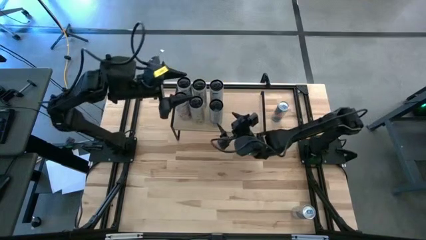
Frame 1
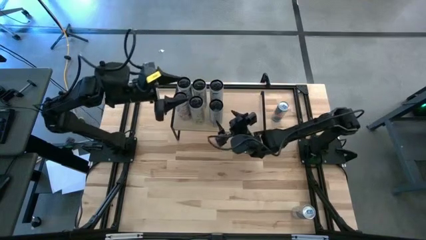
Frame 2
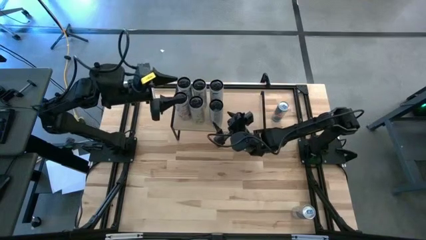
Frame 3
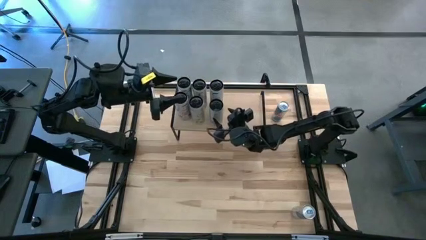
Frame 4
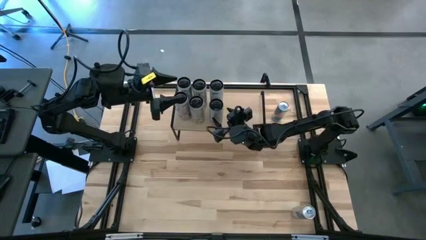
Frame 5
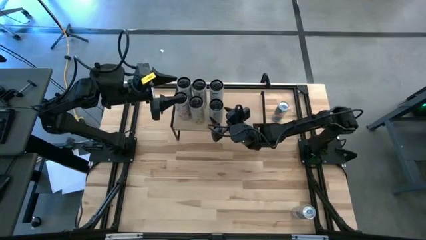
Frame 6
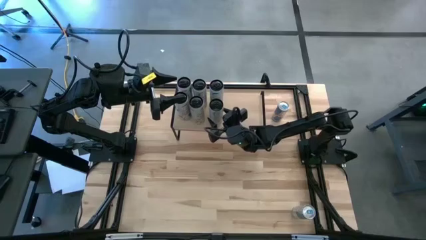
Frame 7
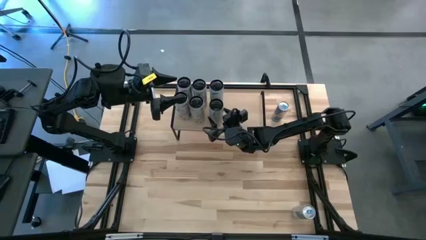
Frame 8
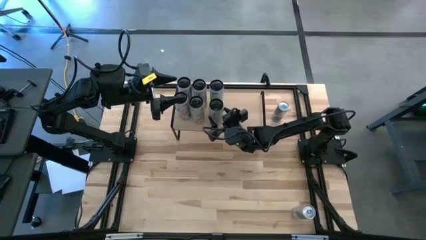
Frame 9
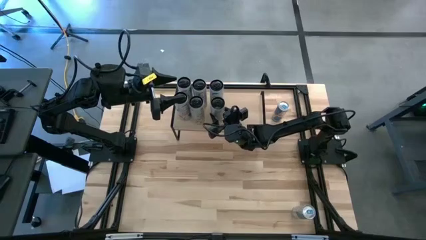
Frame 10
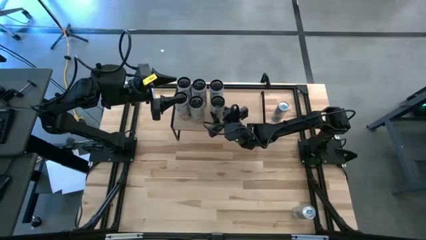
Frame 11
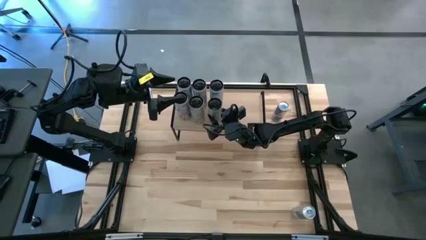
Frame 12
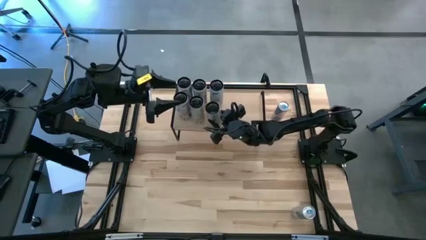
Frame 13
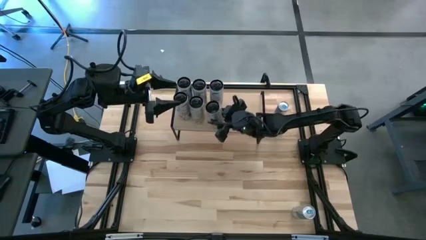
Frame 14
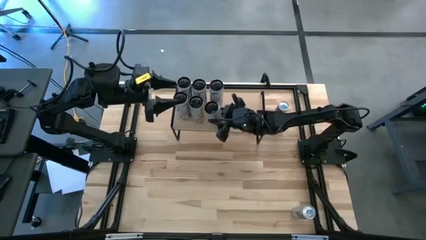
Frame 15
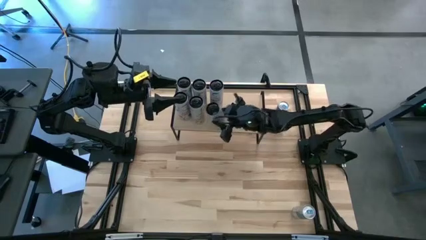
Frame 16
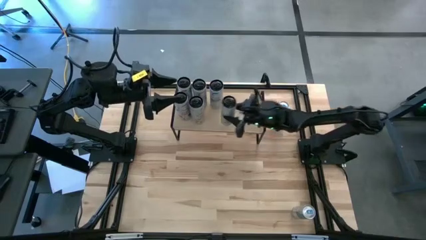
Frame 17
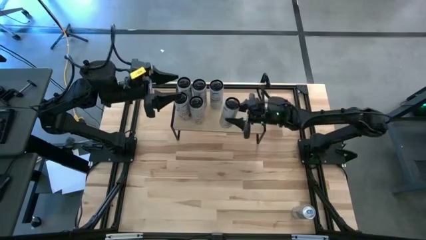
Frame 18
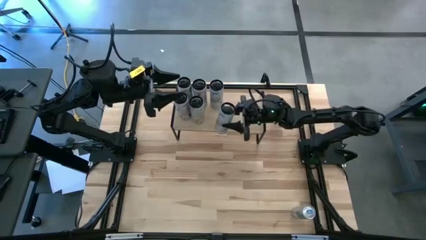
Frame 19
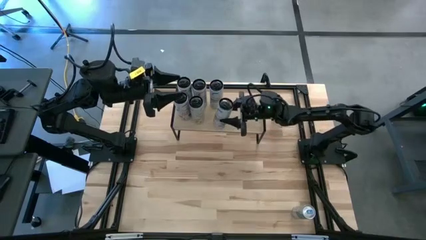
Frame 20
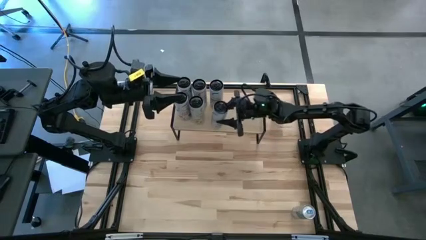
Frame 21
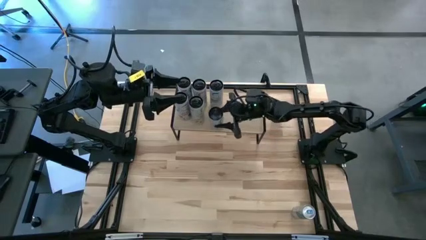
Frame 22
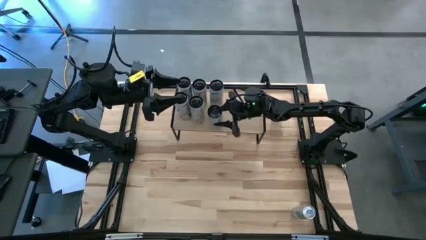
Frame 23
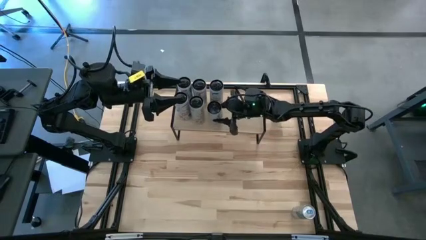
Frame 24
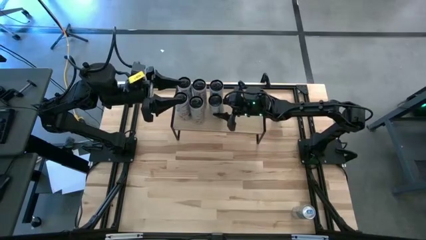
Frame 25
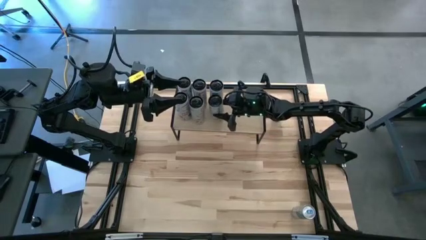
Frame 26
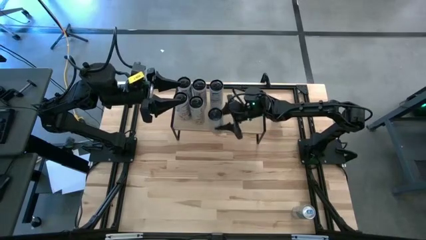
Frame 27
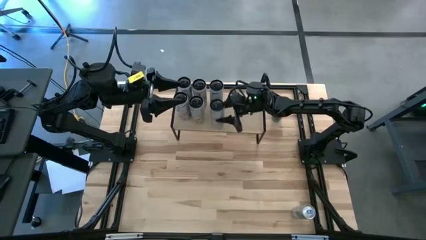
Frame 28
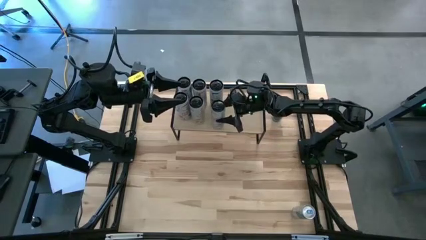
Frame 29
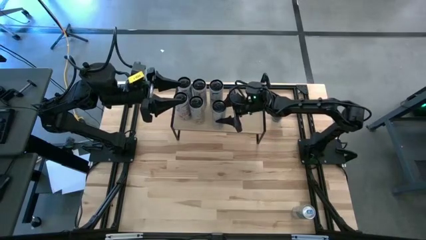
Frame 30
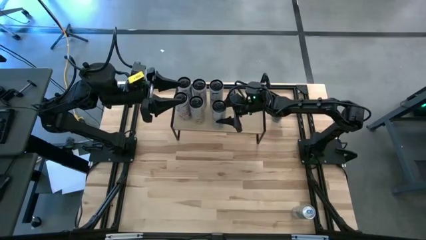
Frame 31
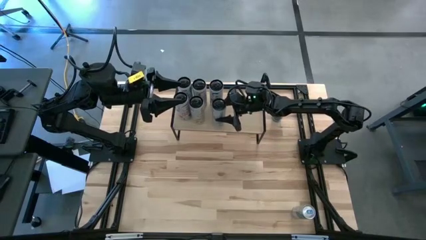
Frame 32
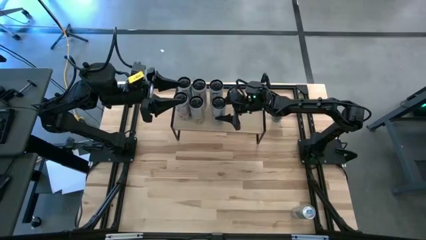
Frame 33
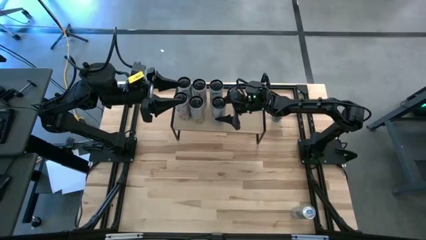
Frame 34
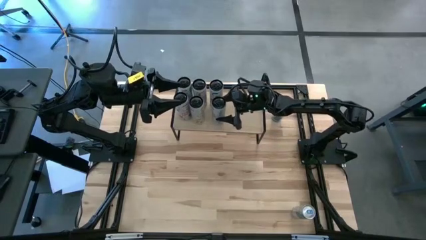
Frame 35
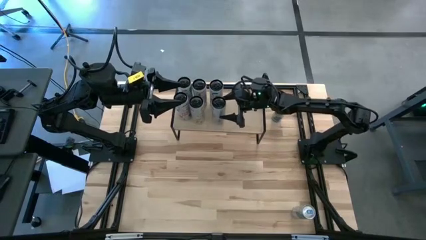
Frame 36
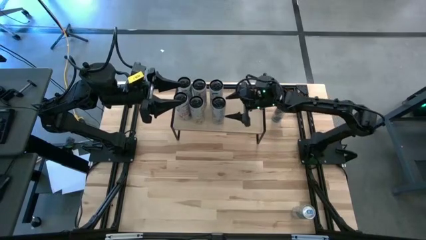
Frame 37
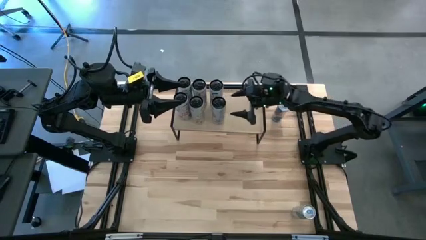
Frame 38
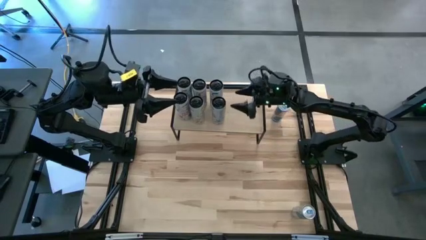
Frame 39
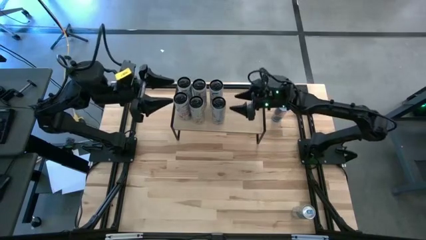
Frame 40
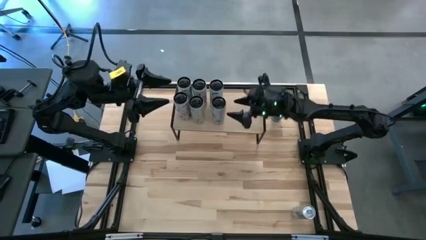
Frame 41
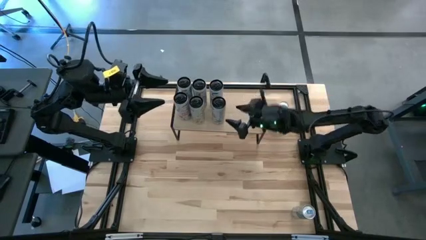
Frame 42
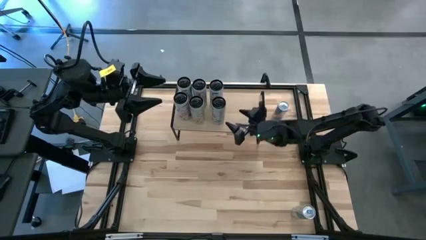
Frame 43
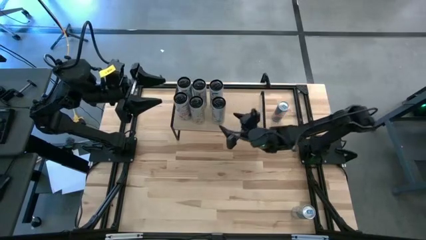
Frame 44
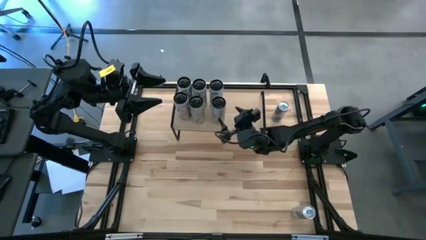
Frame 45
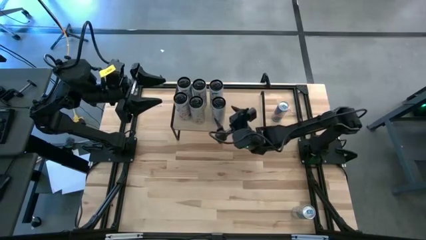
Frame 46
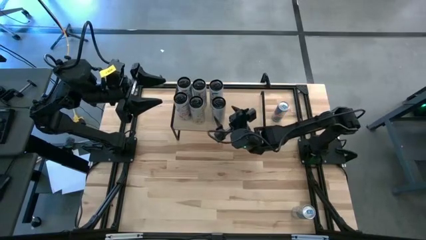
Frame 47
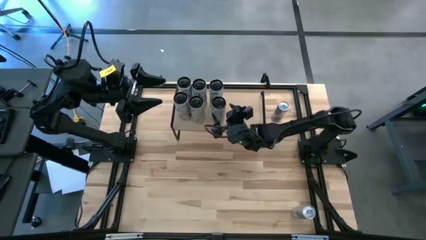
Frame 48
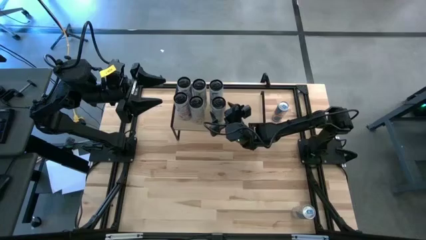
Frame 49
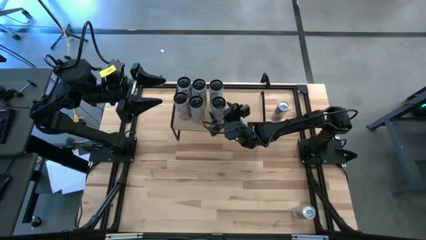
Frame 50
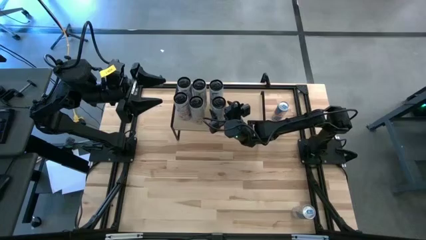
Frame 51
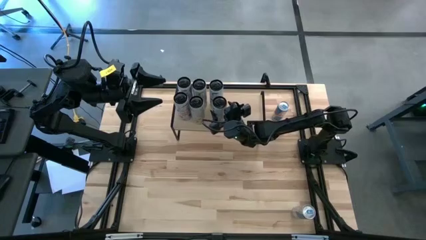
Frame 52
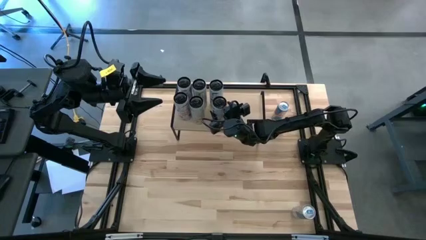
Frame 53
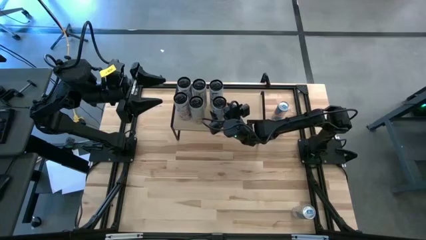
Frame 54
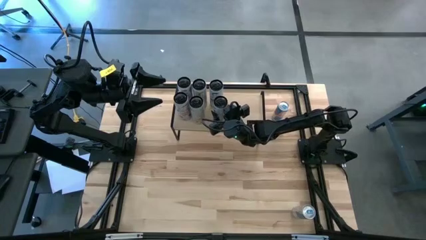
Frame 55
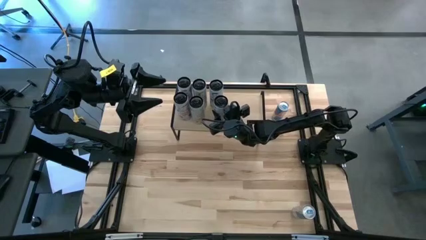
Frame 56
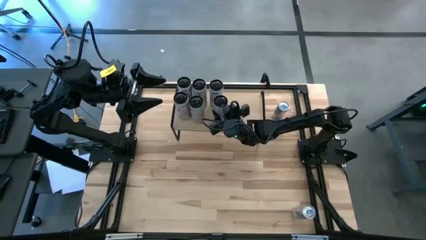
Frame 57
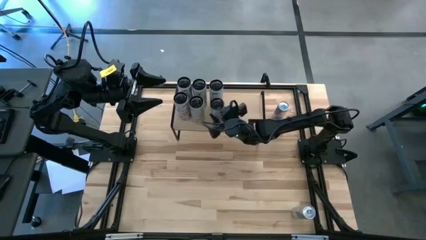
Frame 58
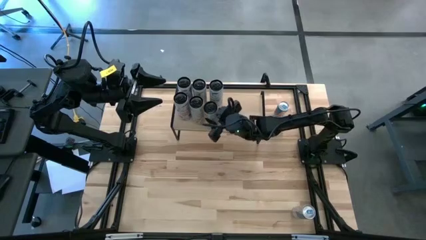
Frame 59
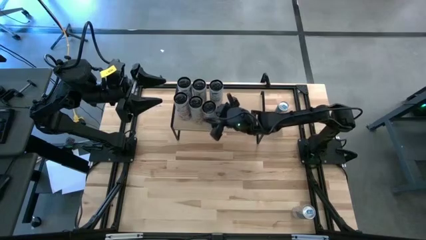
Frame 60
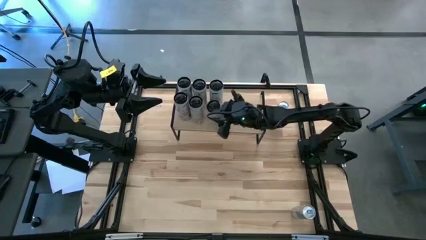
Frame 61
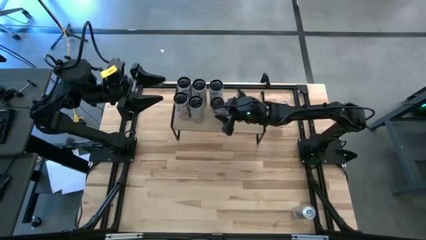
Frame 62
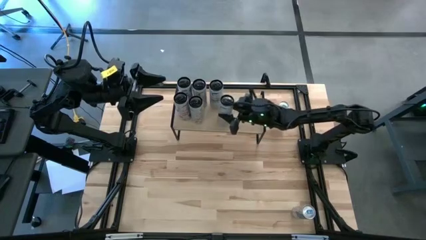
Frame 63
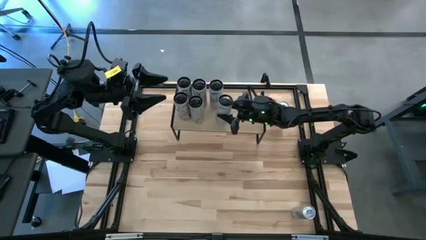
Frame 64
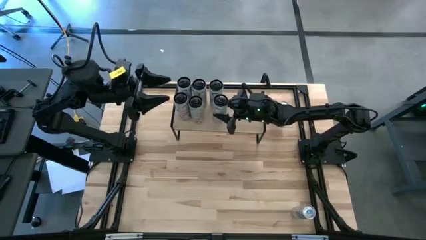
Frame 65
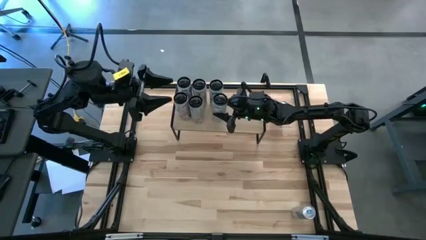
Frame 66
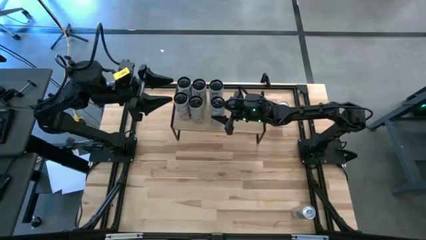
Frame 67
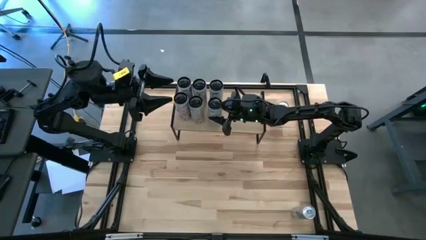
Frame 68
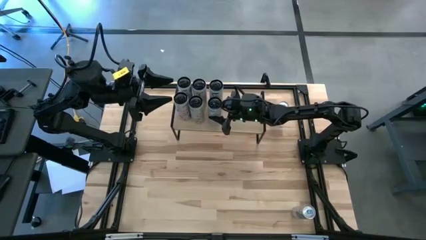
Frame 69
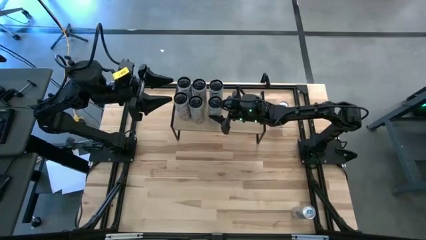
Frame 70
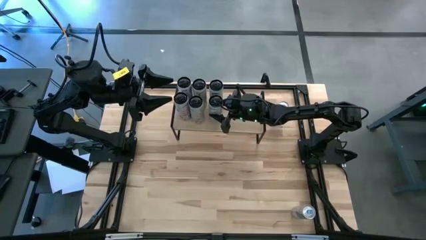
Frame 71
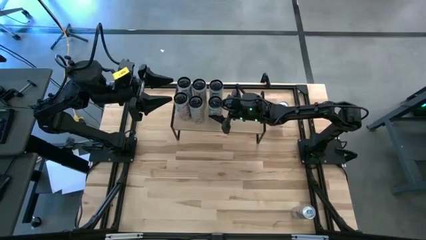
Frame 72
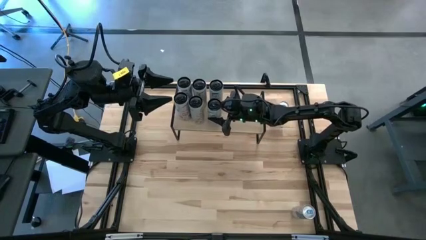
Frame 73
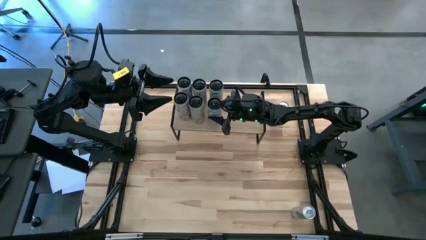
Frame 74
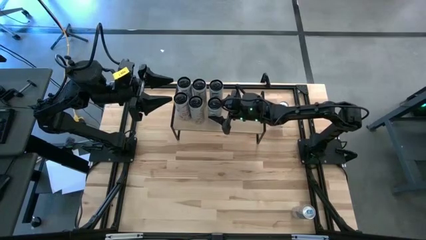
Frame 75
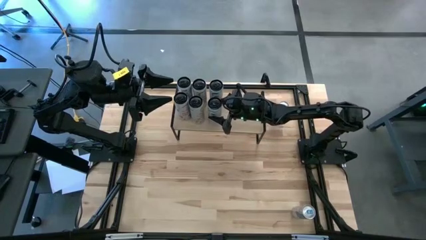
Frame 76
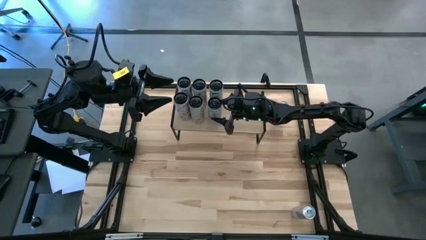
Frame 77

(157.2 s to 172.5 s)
Task: Place canned beverage on shelf
Put the white blue soda can on the shelf aligned with the other white blue soda can
